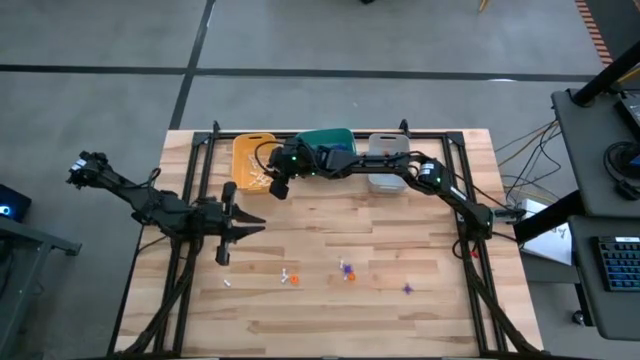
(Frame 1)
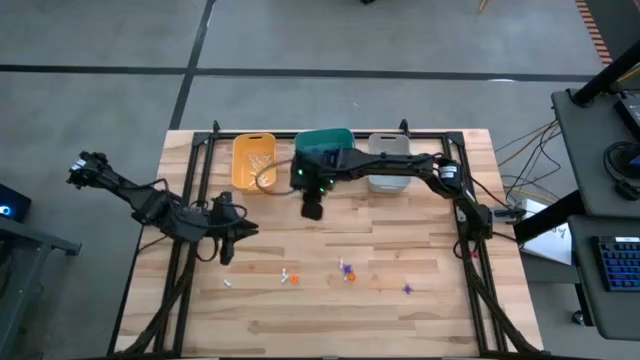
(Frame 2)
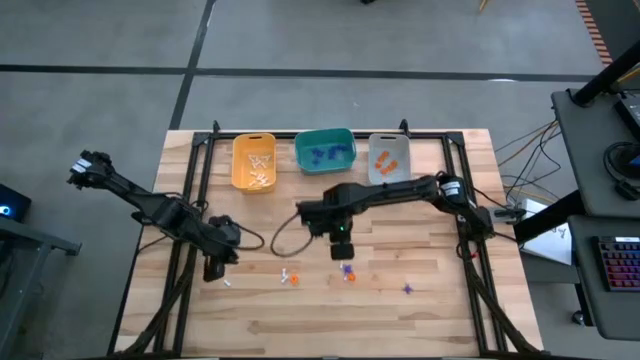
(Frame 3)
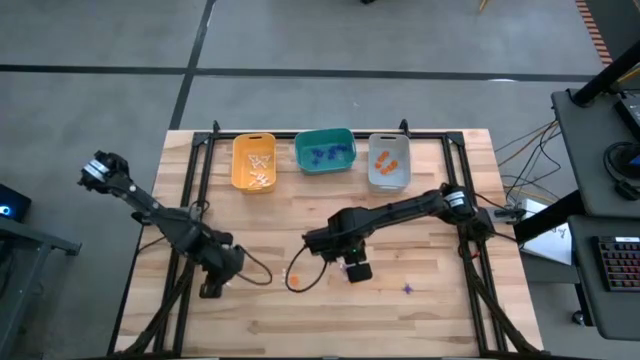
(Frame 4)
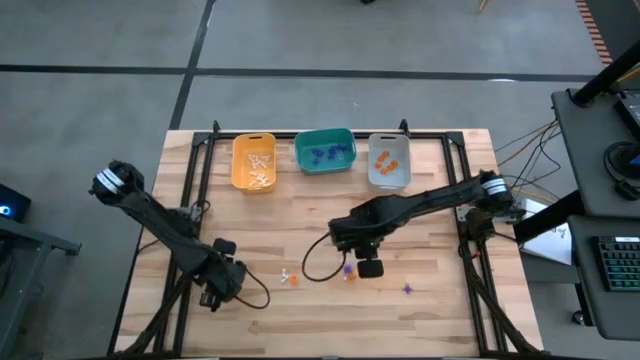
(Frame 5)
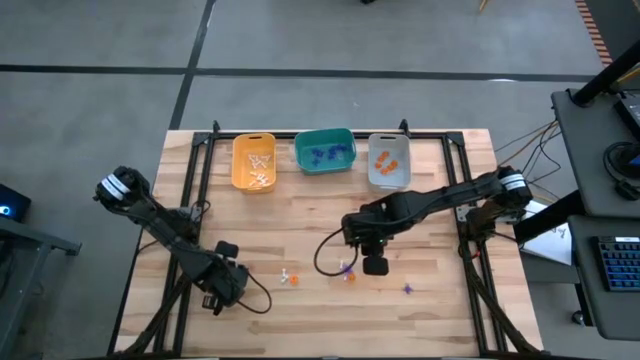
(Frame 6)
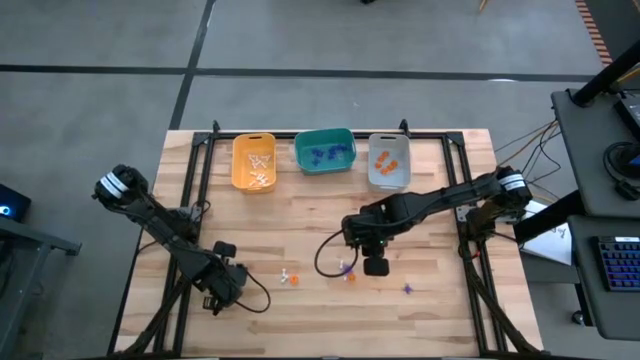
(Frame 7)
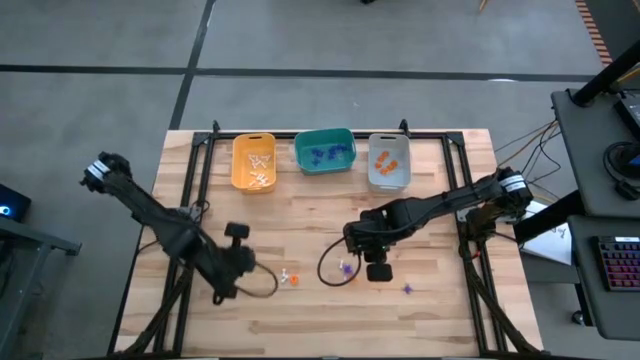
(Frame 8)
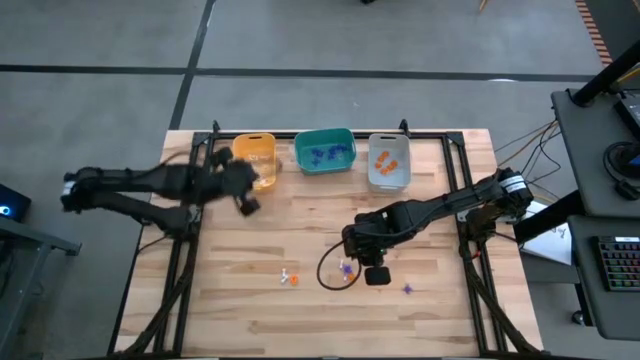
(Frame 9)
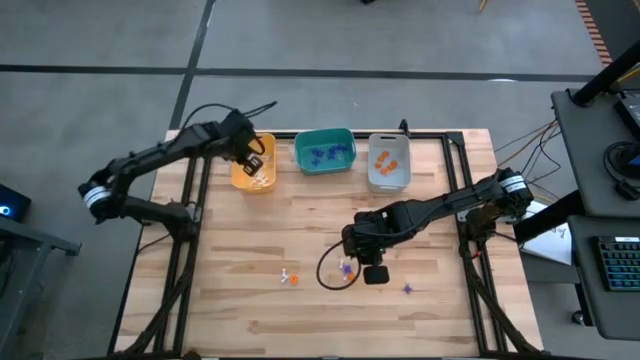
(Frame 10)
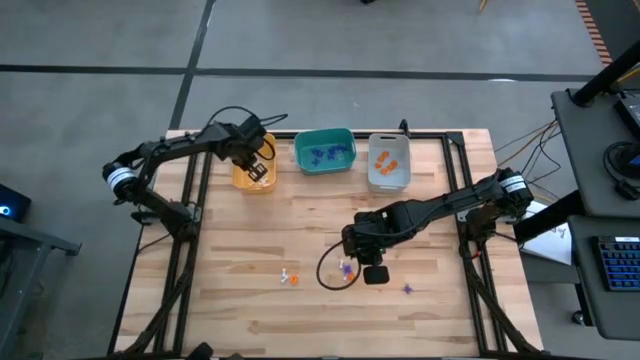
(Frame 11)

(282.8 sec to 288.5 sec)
Task: Sort Halloween decoration
Put the white bone toy into the yellow bin

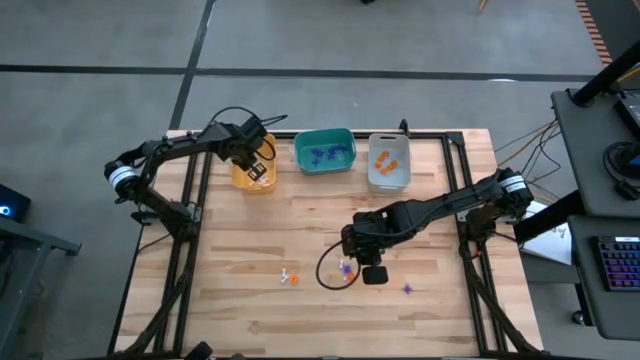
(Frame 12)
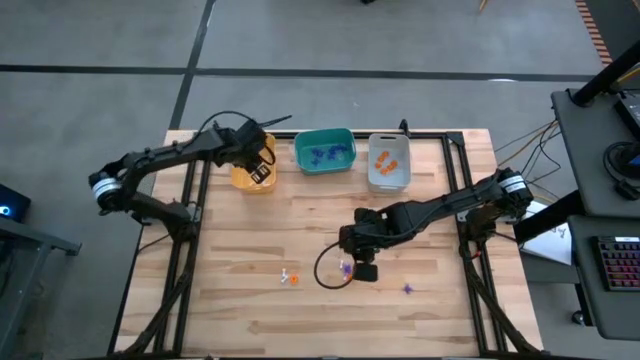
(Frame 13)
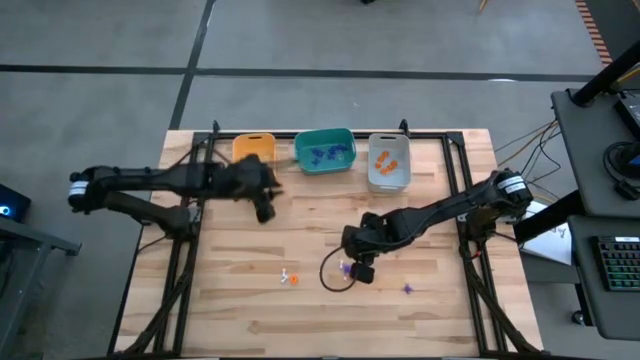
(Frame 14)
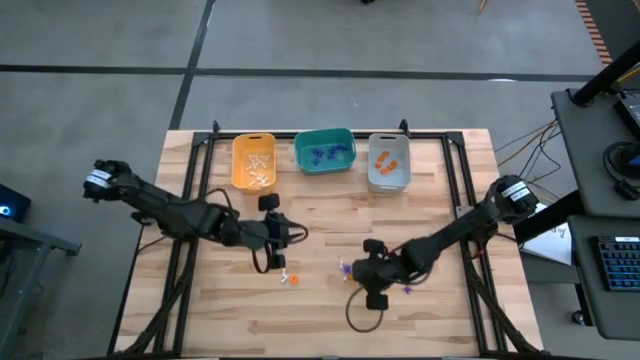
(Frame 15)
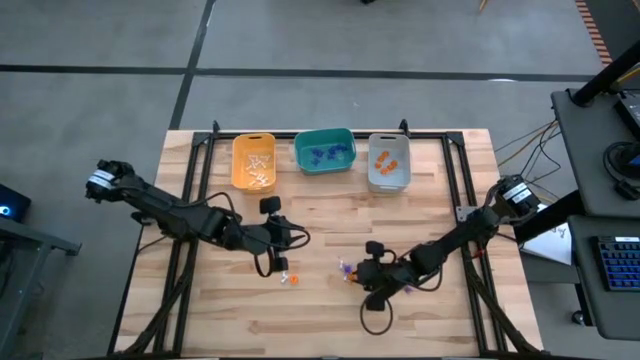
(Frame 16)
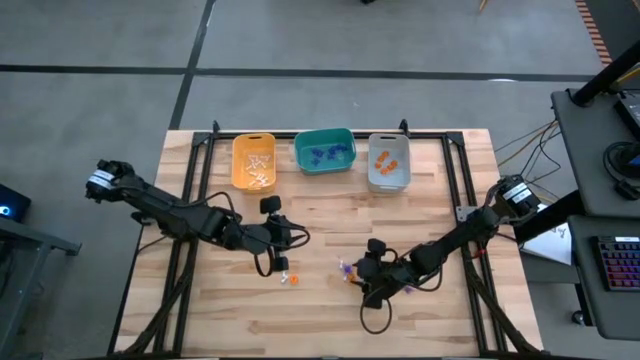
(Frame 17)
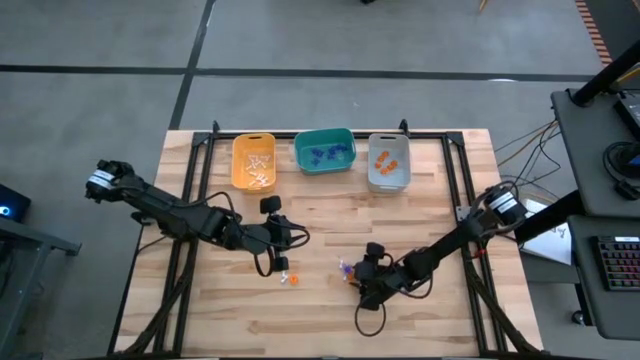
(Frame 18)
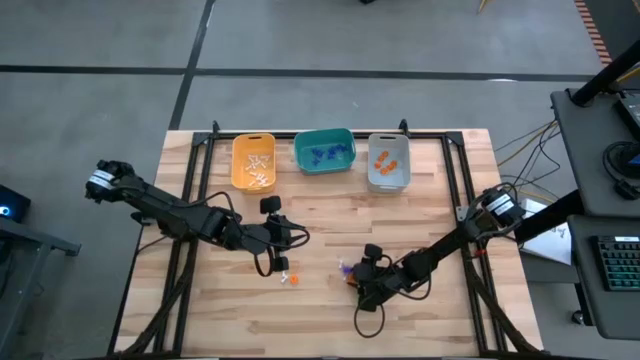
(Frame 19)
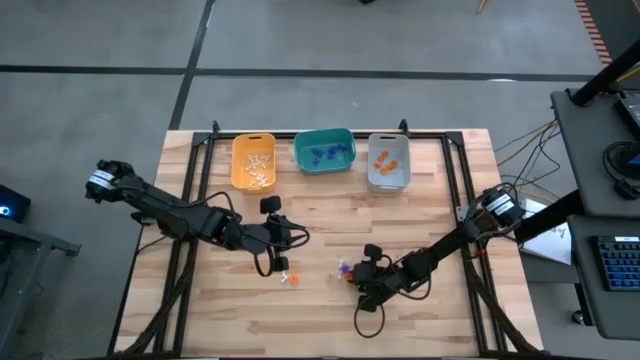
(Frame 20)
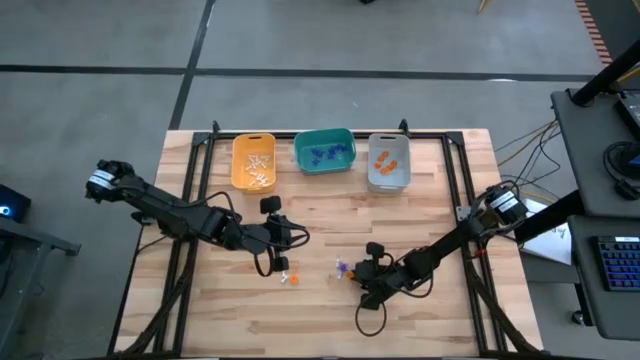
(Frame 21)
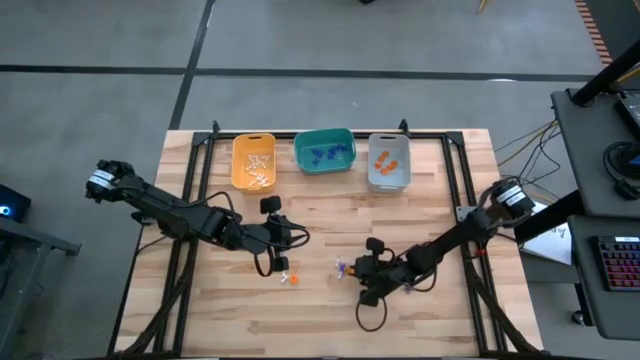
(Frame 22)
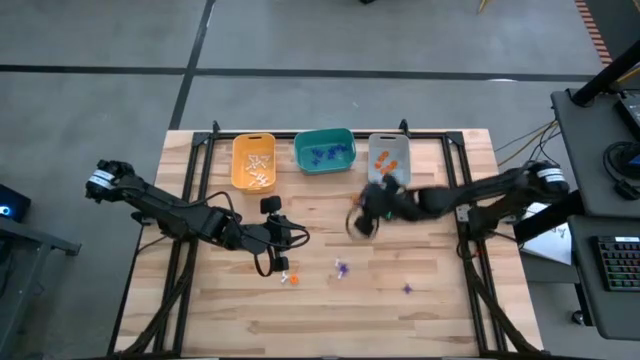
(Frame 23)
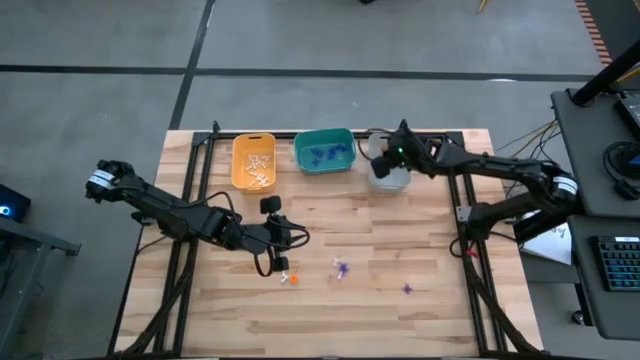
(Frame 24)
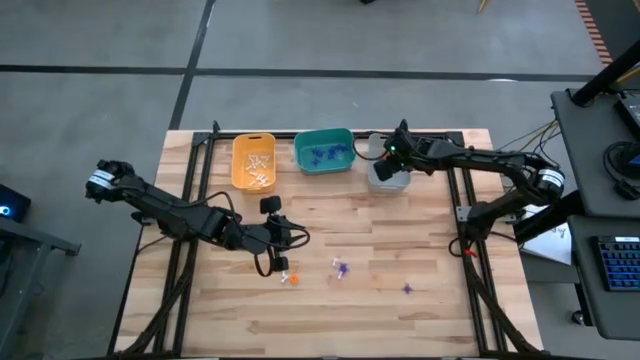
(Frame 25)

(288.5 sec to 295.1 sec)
Put orange pumpkin toy into the gray bin

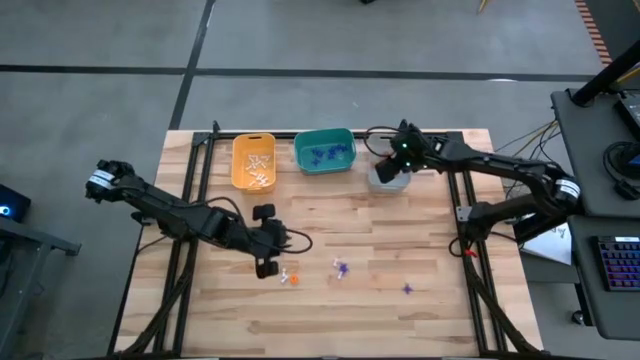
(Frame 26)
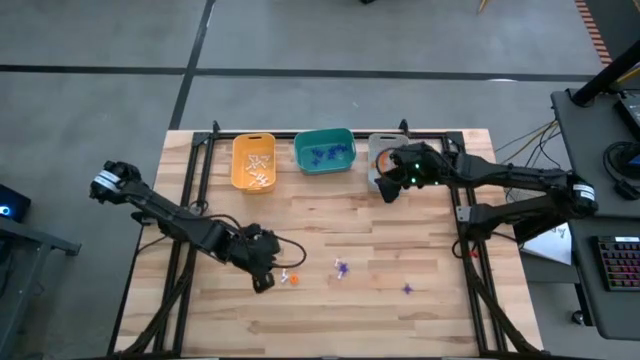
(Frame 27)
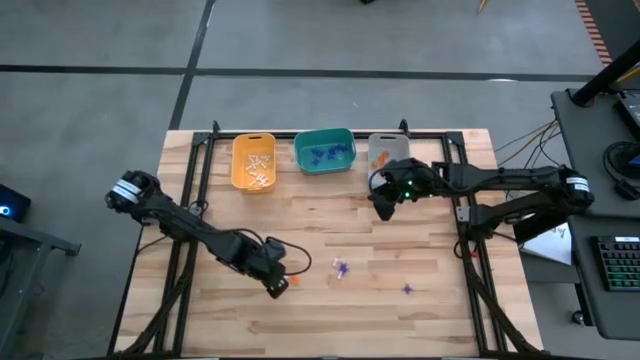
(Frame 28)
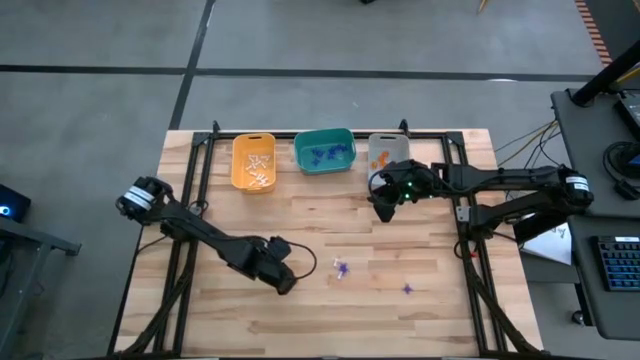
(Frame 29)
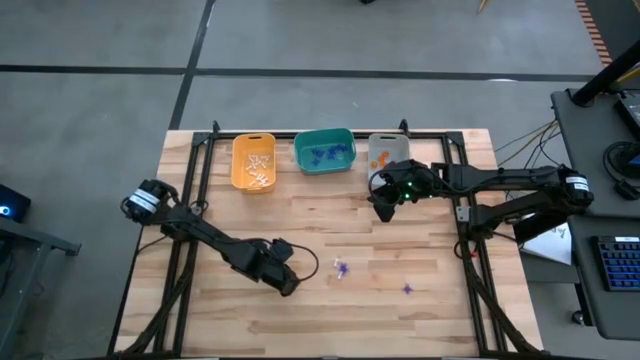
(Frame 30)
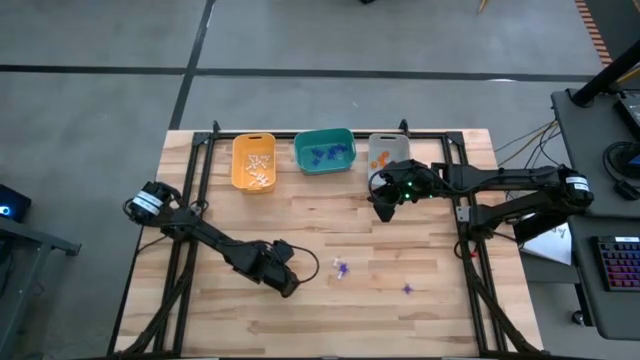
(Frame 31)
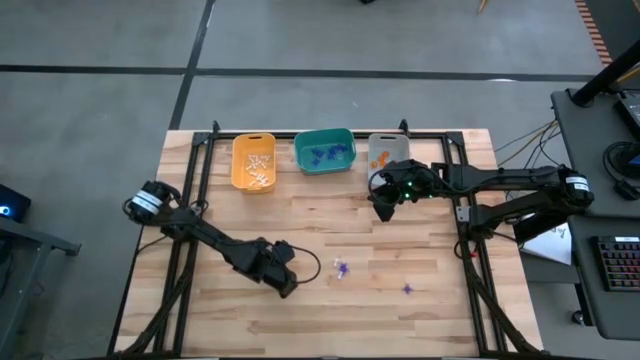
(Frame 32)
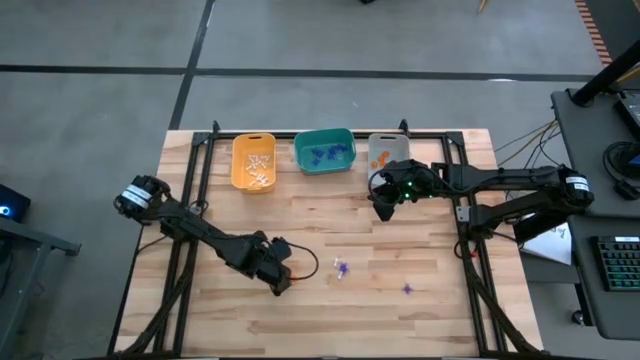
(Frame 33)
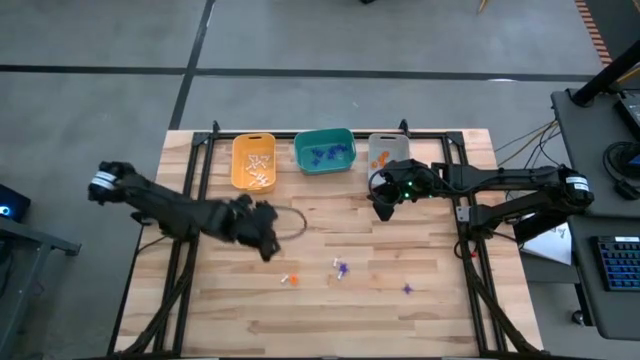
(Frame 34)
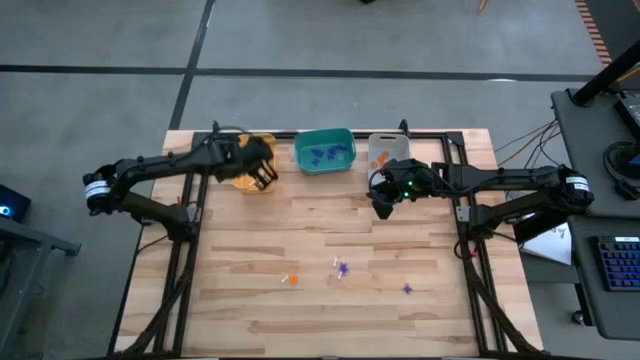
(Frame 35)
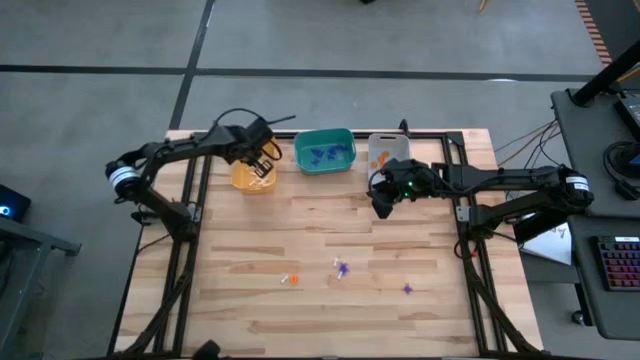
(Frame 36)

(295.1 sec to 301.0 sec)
Put the white bone toy into the yellow bin

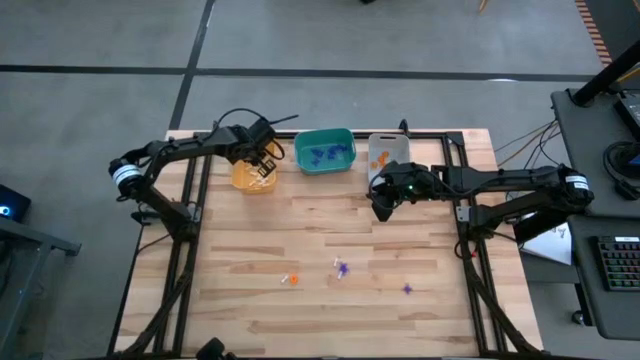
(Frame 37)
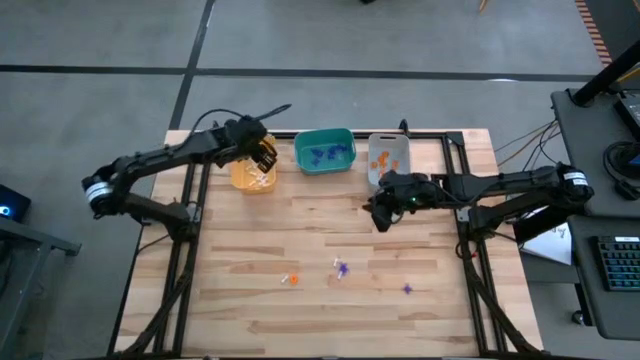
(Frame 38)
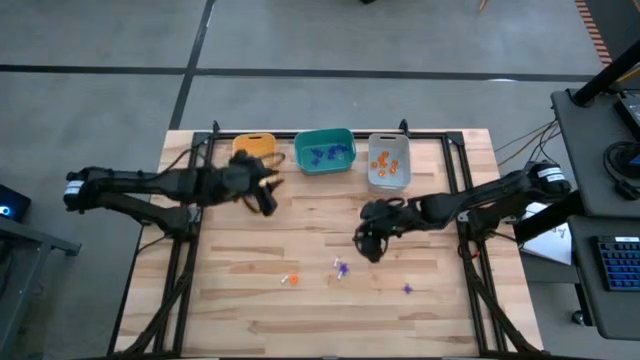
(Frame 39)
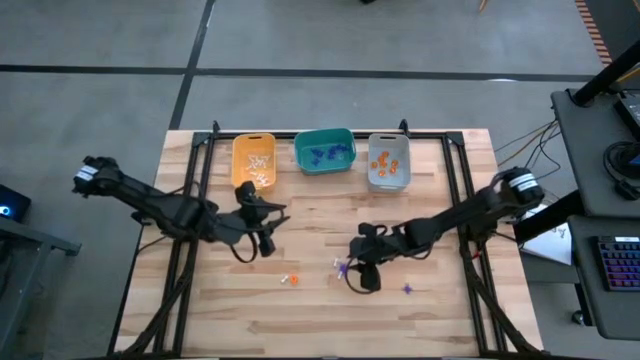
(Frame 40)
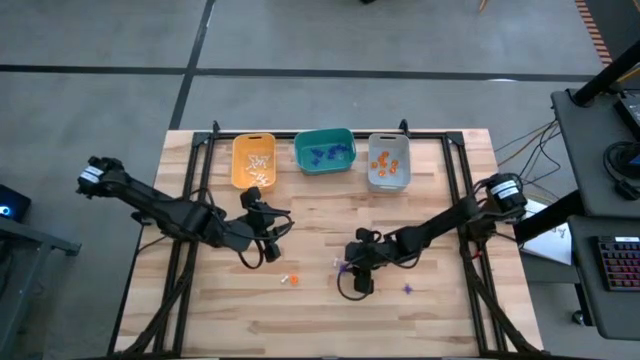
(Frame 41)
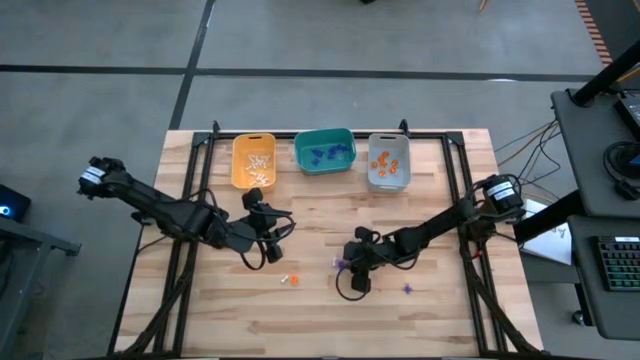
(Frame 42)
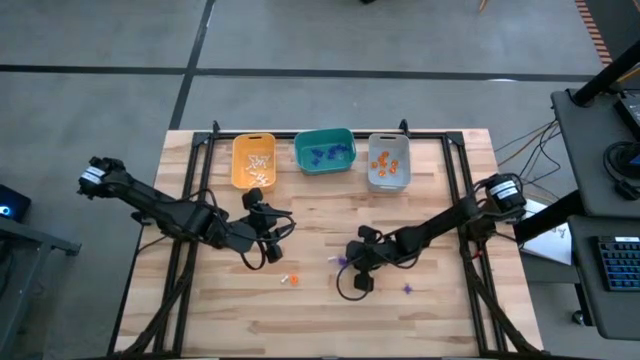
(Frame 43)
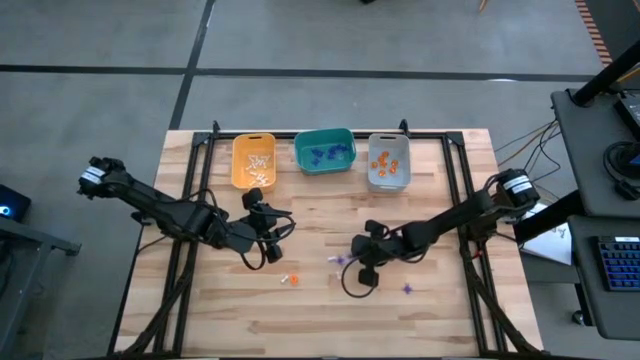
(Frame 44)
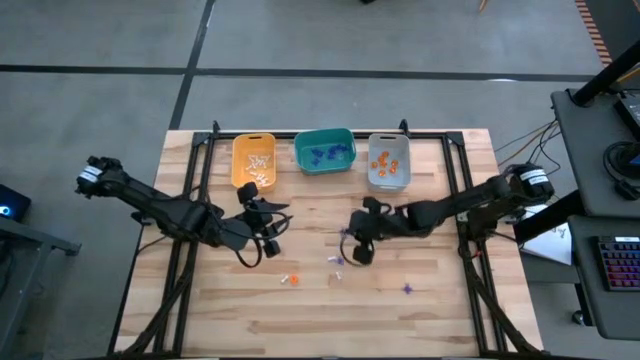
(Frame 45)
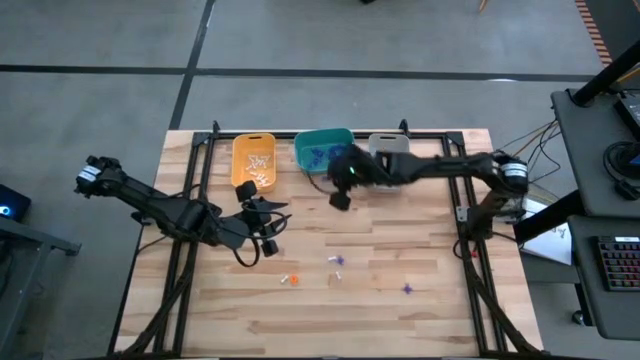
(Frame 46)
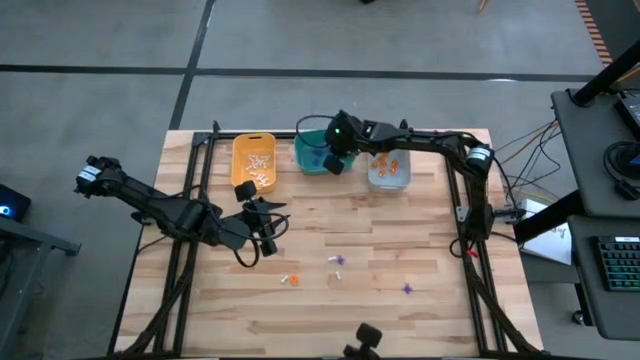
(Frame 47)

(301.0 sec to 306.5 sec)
Put the violet spider toy into the green bin
